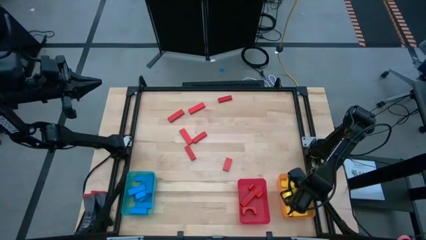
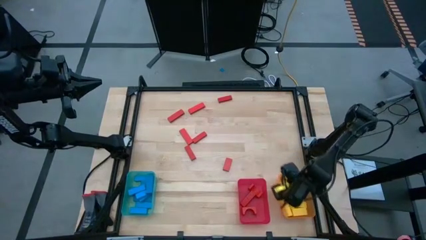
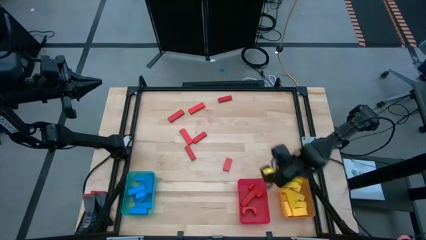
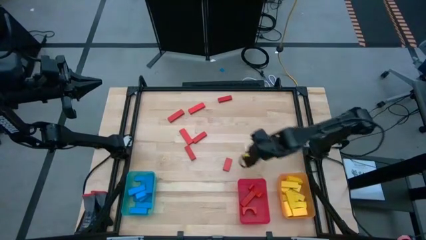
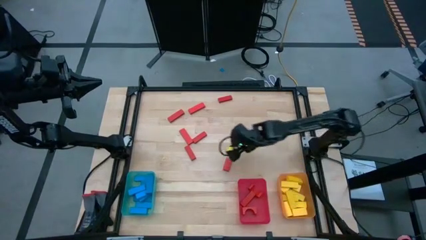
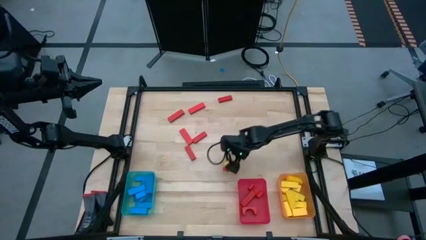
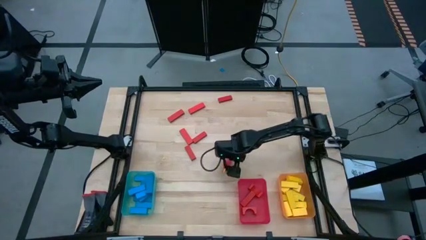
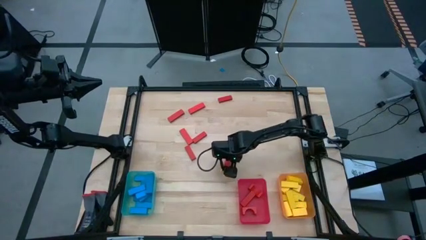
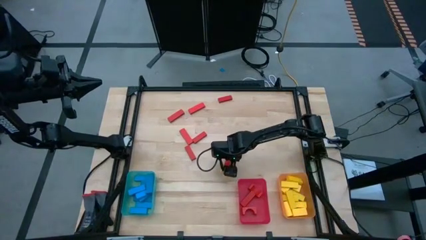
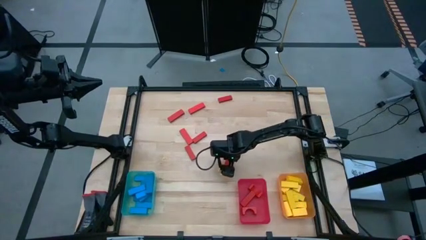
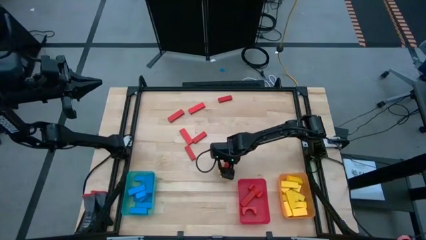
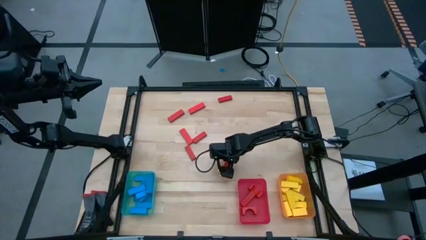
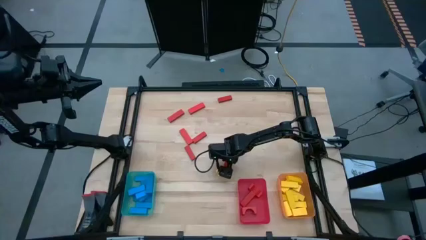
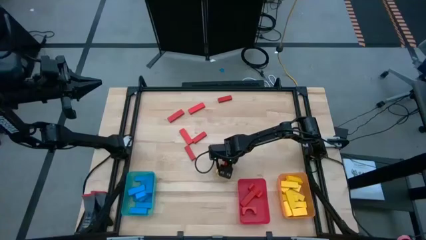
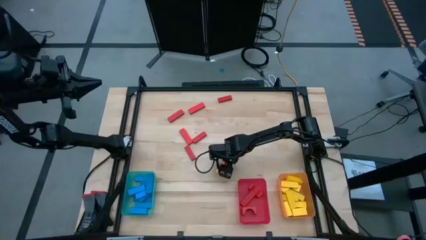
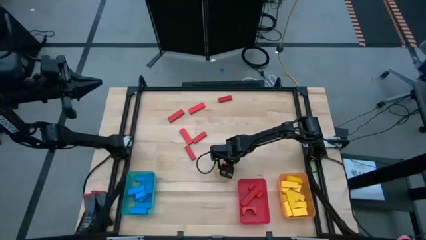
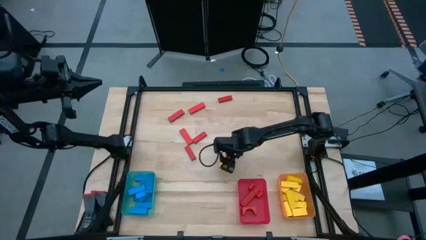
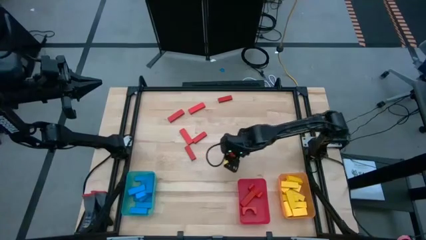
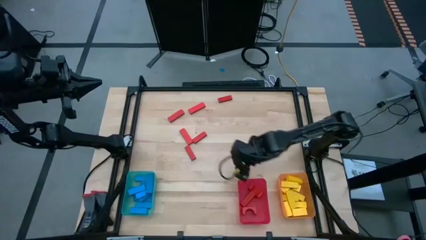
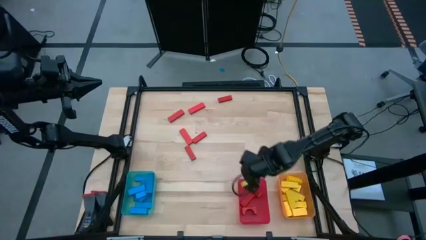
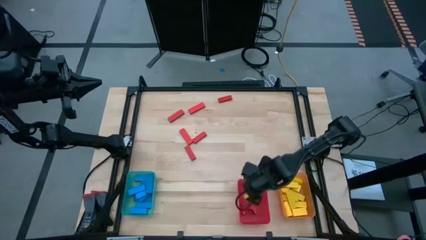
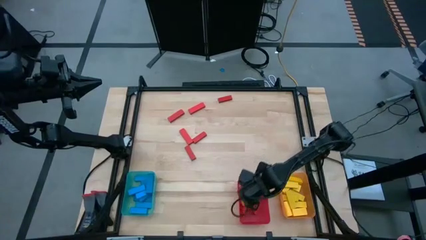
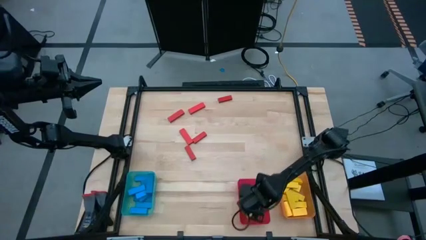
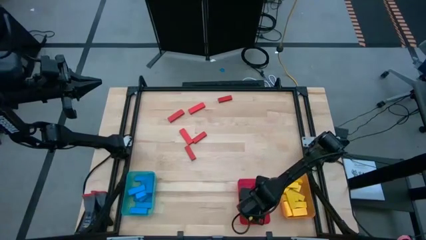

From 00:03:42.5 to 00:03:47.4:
Task: Sort blocks
Put the red block into the red bin

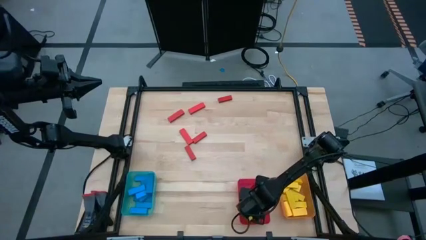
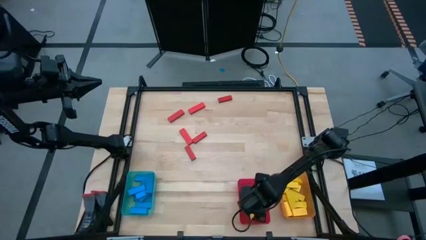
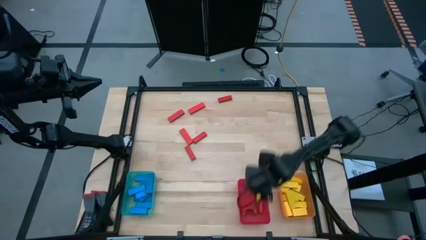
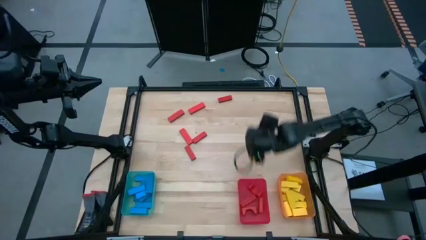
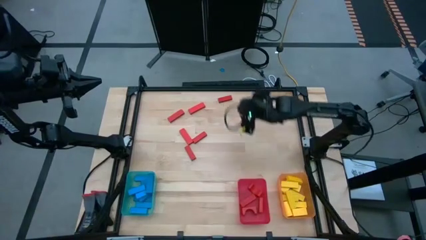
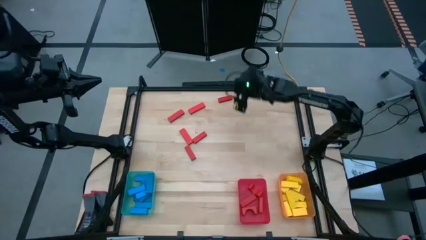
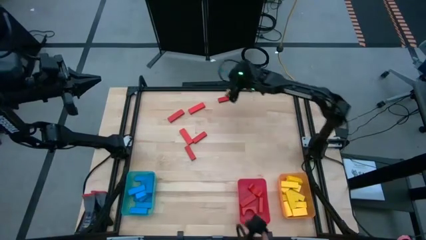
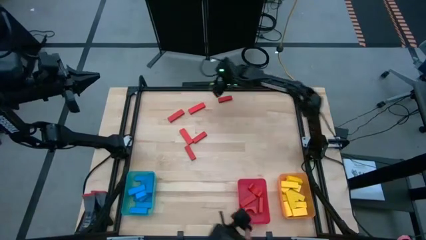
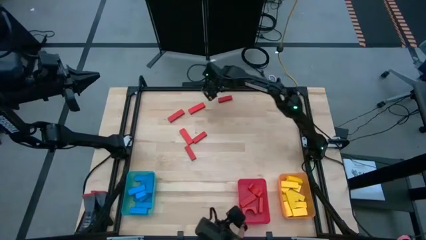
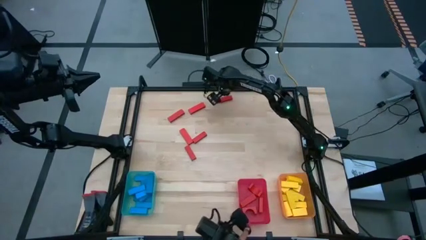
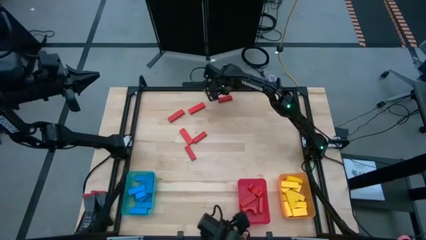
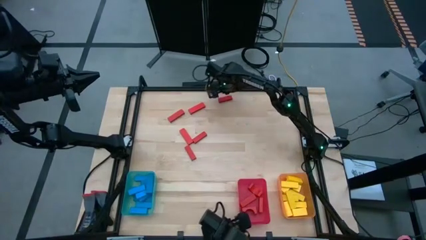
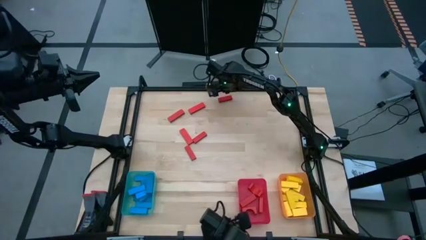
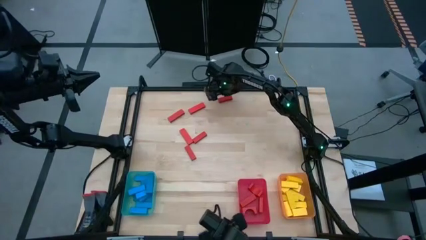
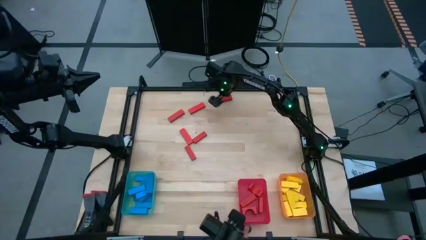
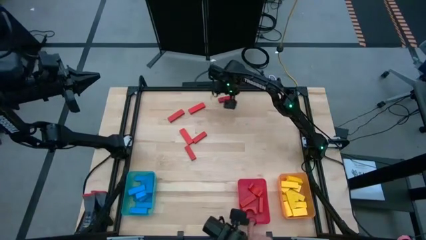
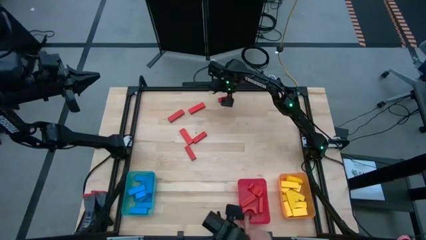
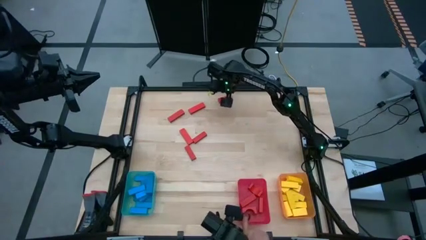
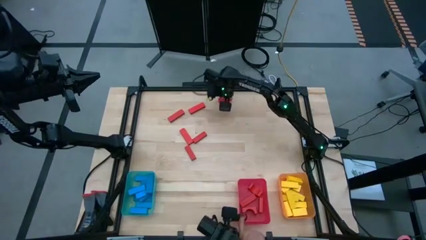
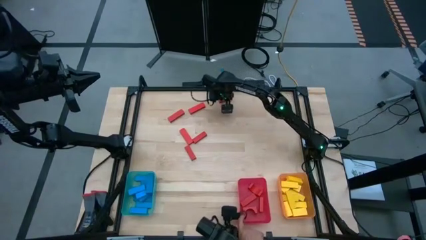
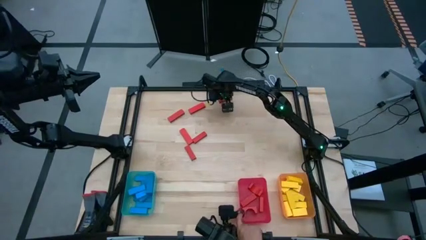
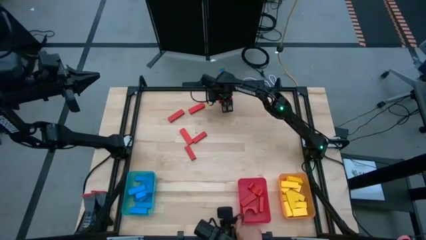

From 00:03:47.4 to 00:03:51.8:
Put the red block into the red bin

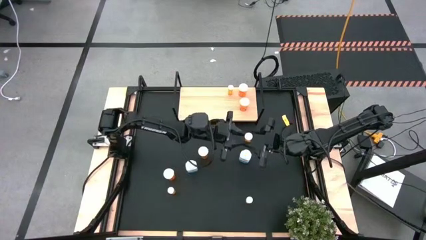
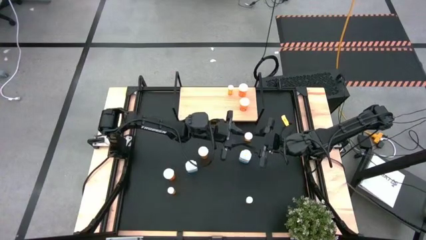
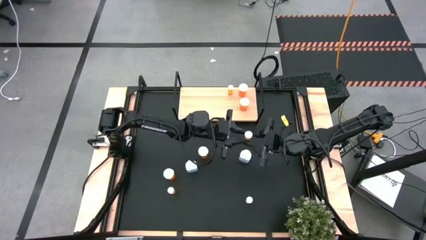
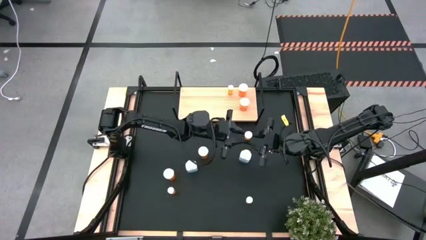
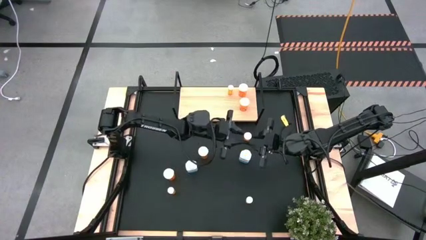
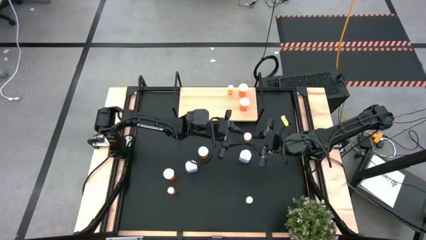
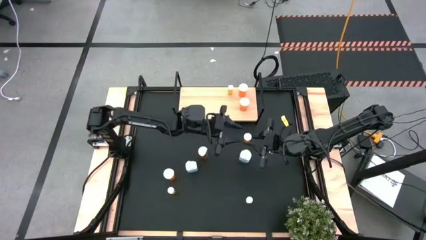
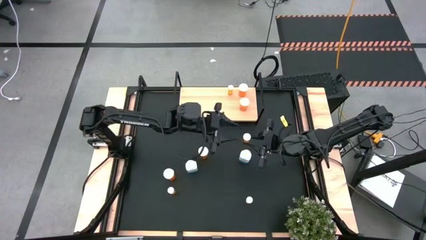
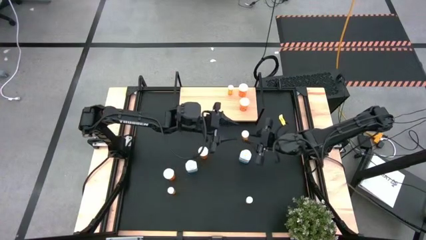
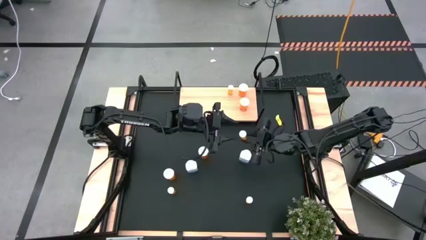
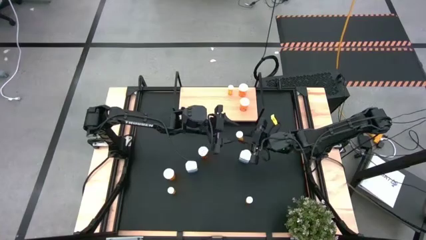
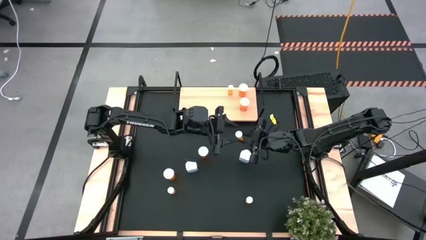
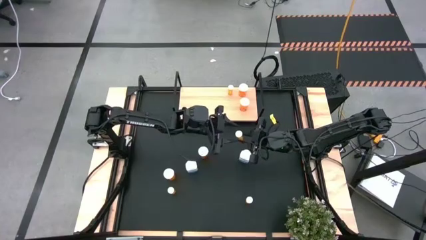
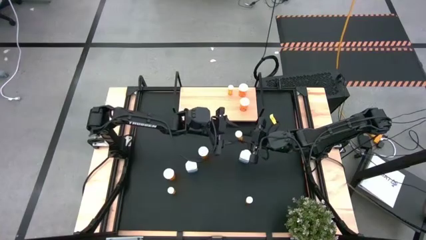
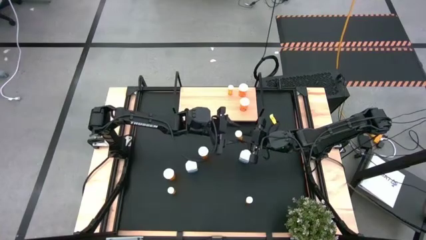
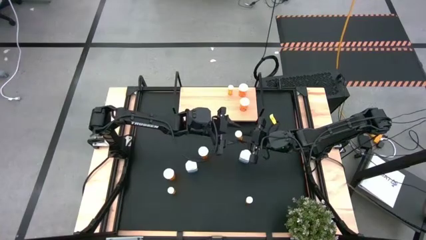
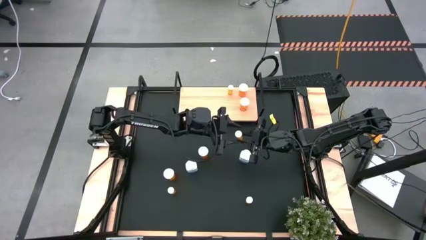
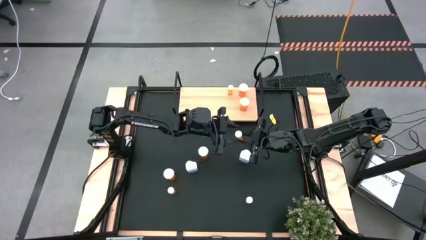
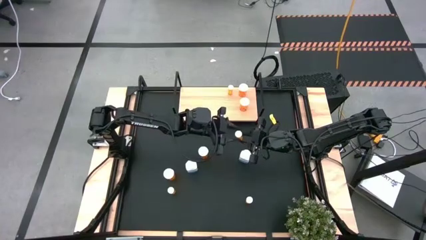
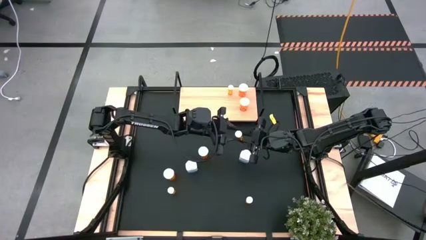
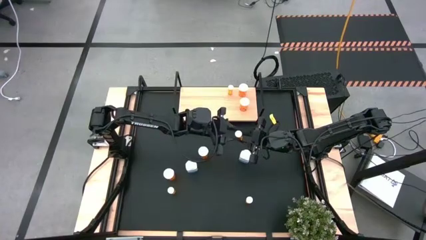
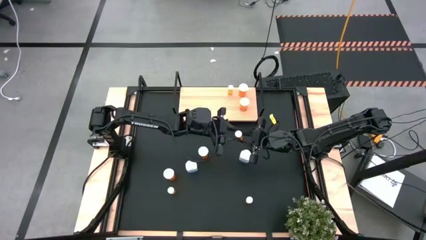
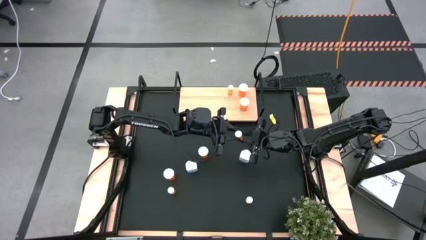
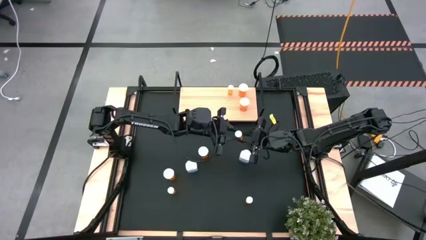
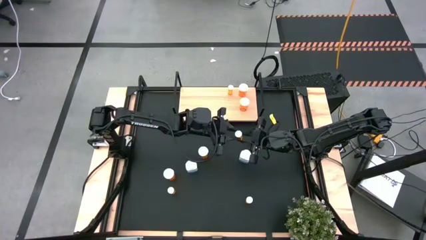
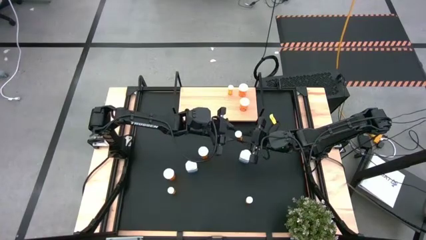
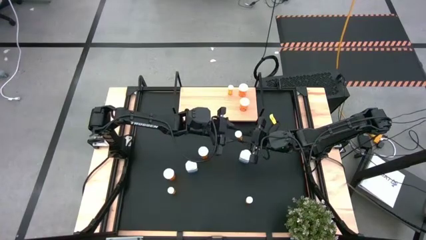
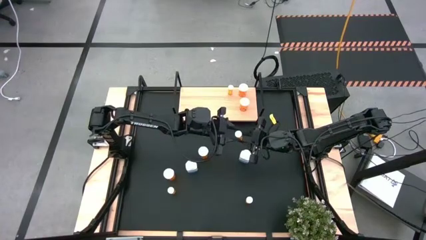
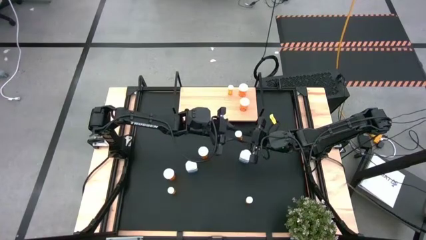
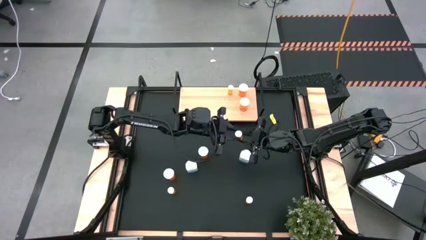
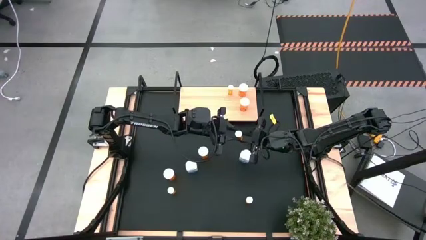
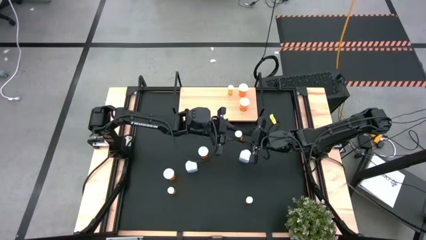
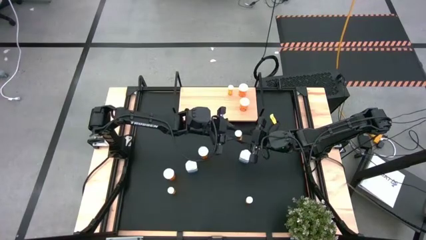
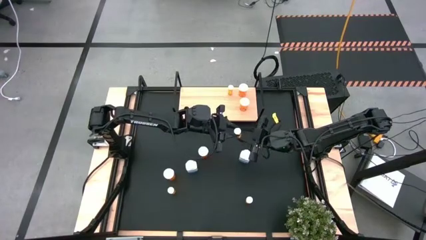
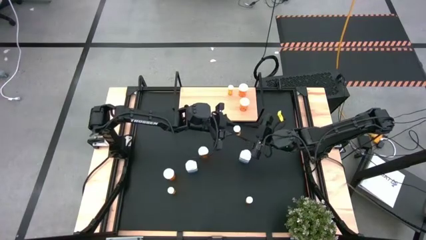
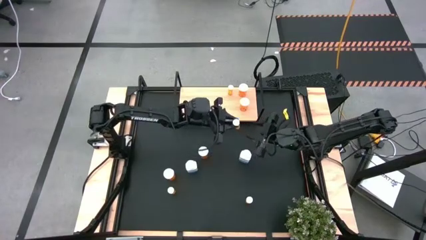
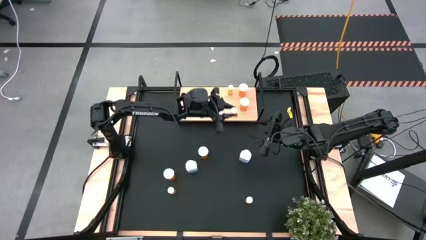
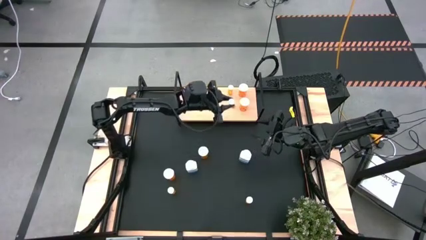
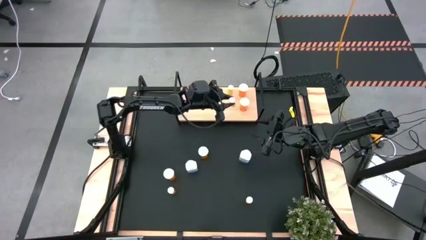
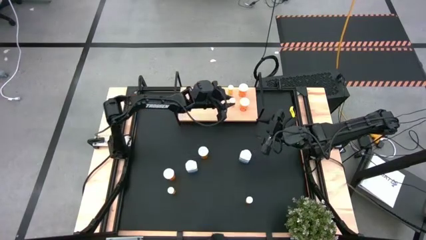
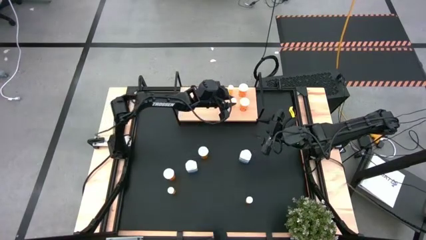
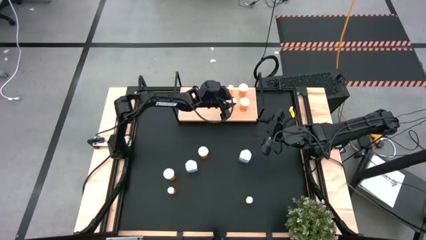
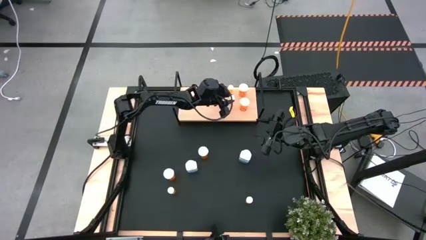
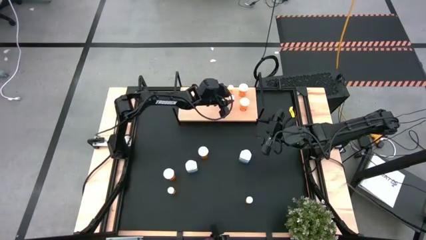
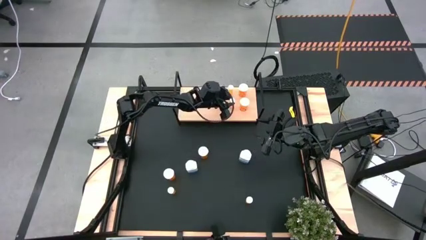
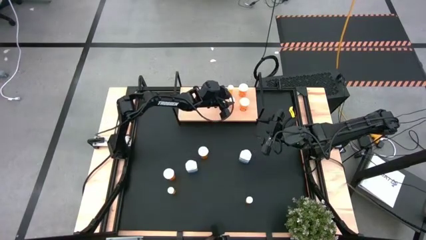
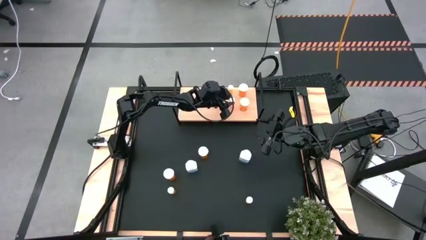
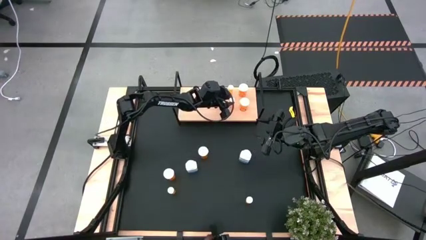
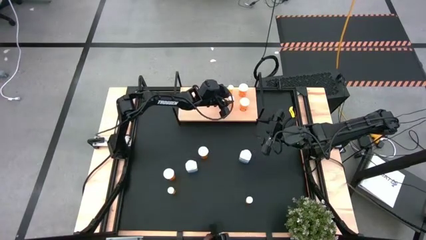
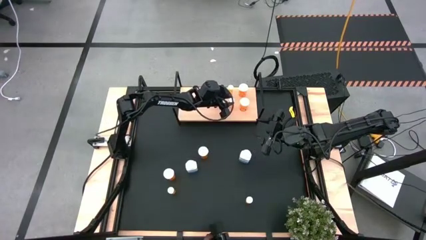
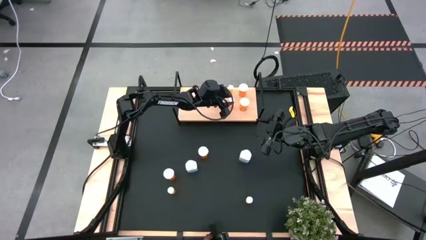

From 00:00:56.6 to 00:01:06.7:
Task: Pick and place medicine bottles onto shelf by color
Put the top right small orange pill bottle aligned with the other small orange pill bottle on the shelf
